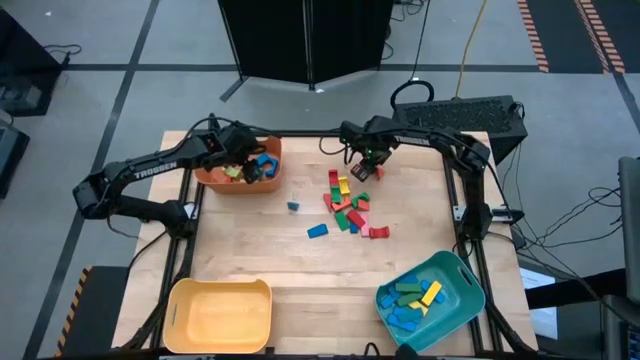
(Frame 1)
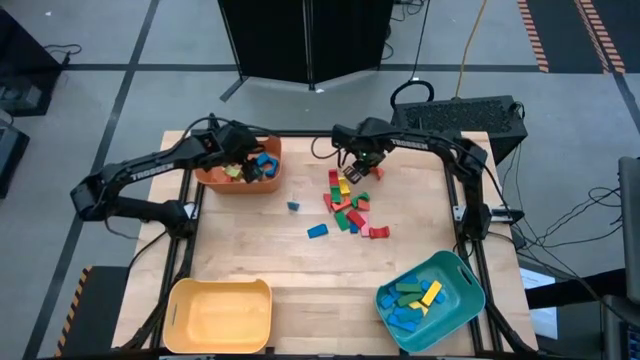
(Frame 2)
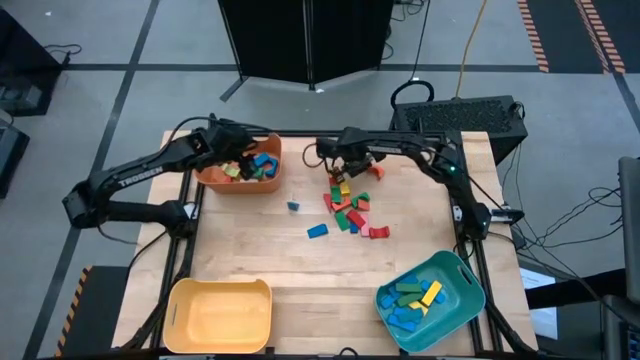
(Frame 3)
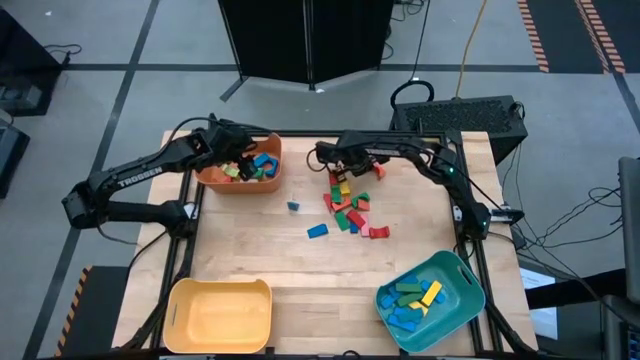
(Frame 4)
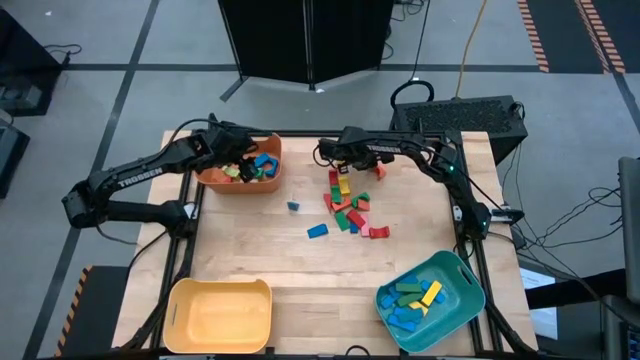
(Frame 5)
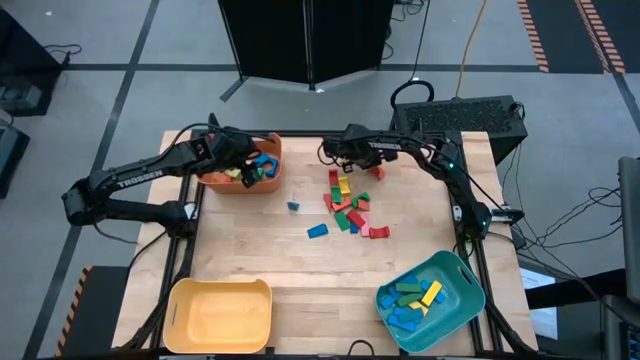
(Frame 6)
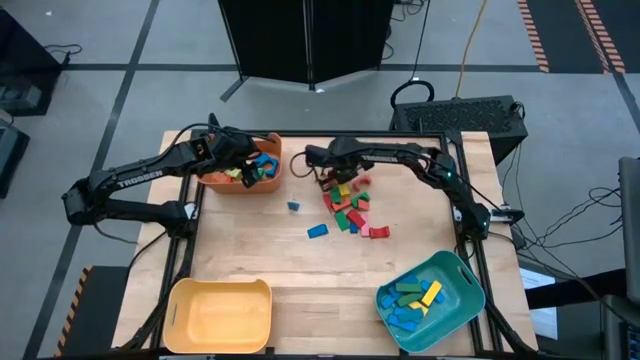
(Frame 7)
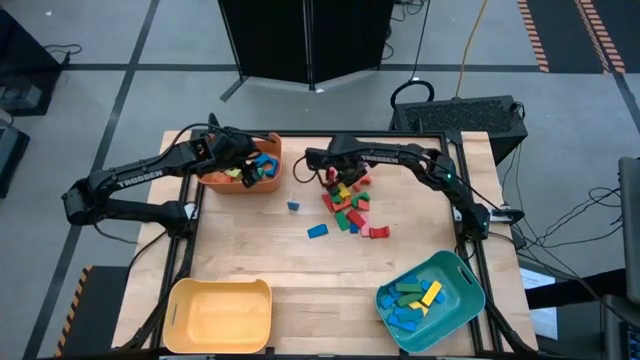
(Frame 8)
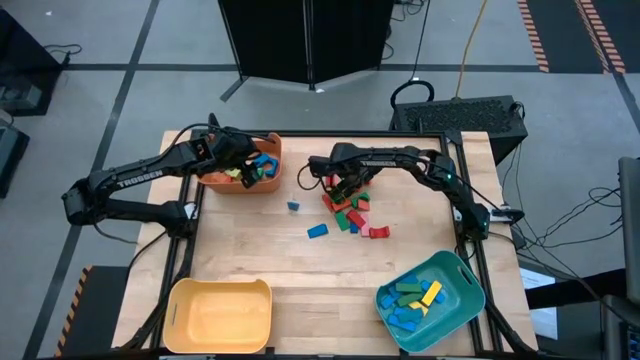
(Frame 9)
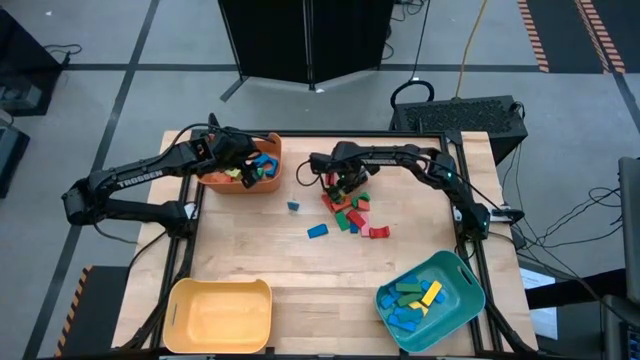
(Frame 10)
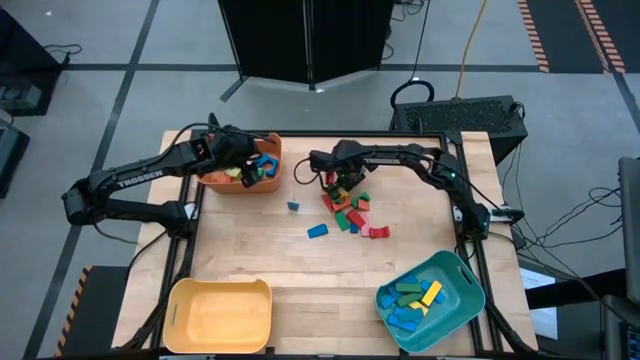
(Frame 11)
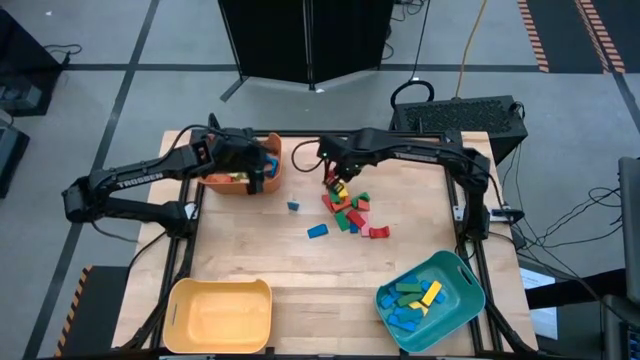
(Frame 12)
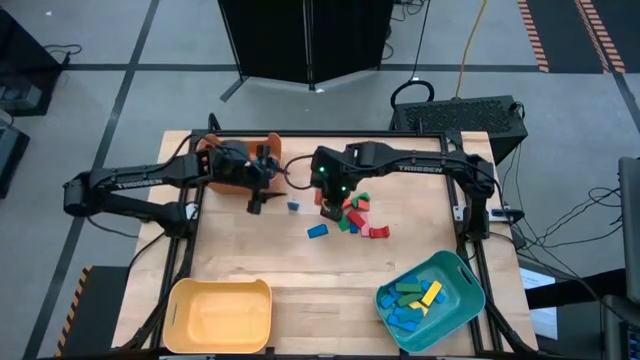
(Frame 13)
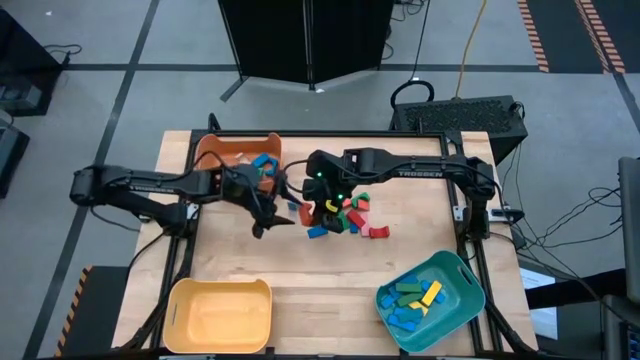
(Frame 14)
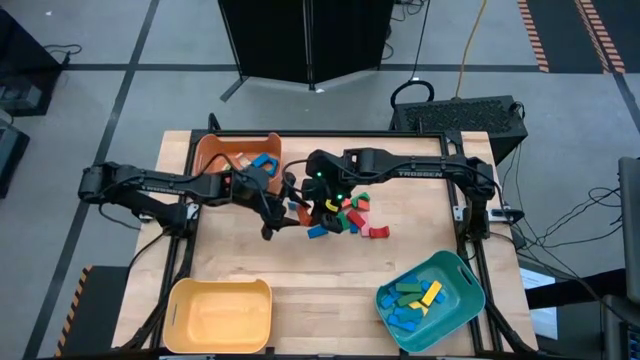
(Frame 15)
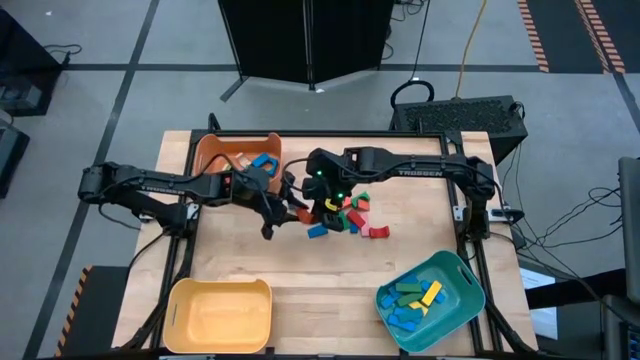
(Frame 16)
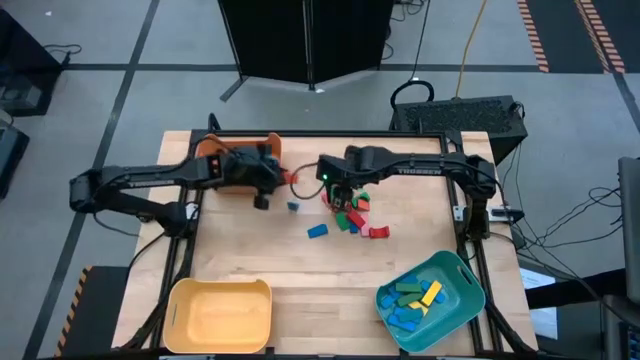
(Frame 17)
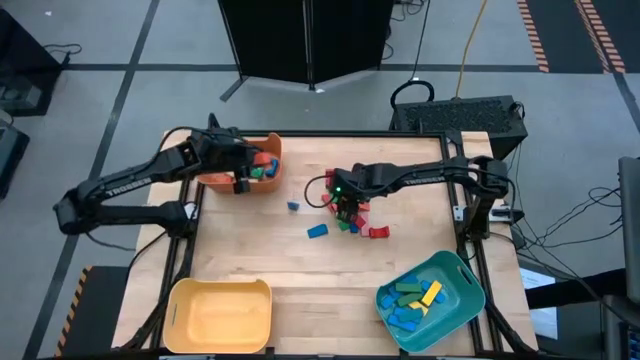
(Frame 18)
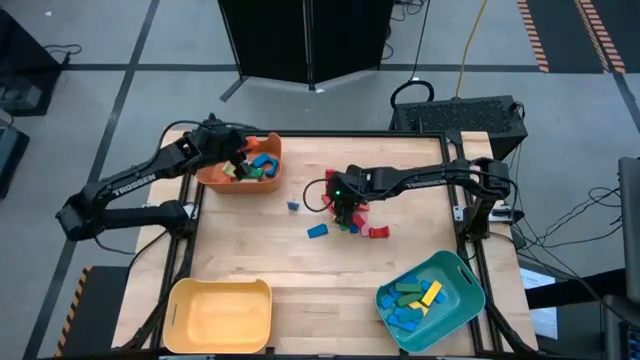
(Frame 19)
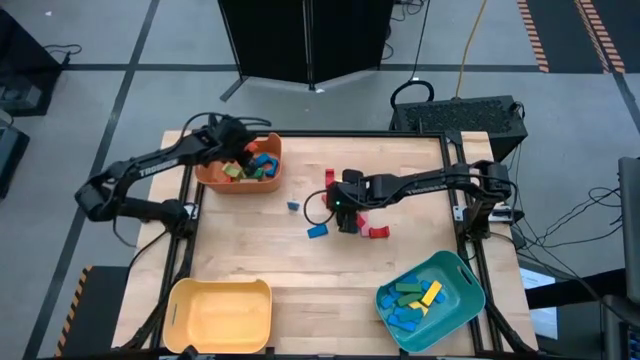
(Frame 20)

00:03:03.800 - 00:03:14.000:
Task: Sort blocks by size
Put the orange arch block into the orange bin

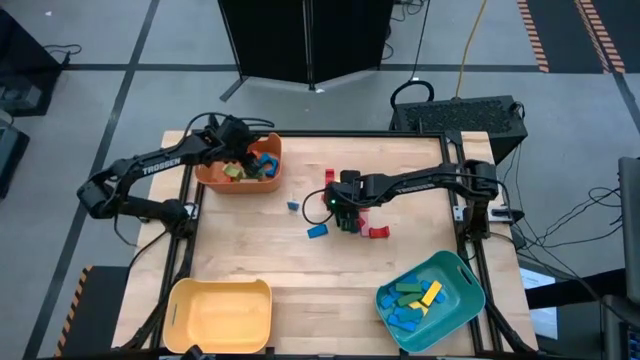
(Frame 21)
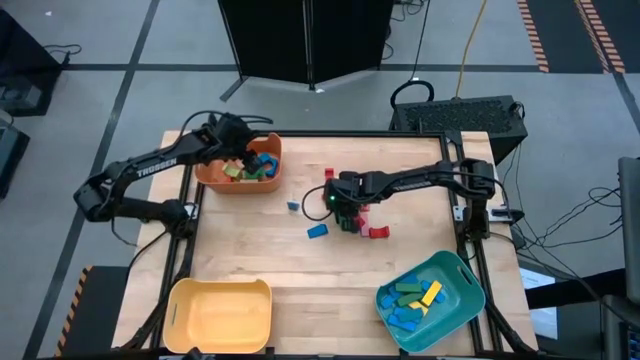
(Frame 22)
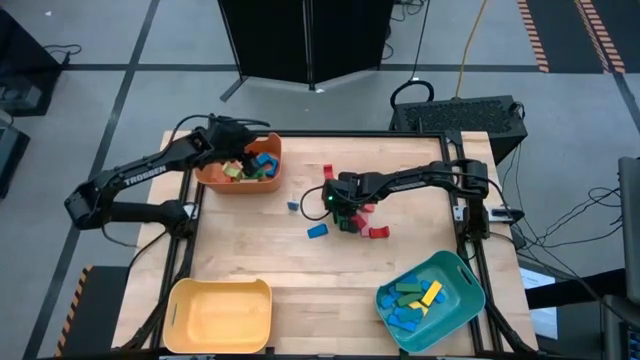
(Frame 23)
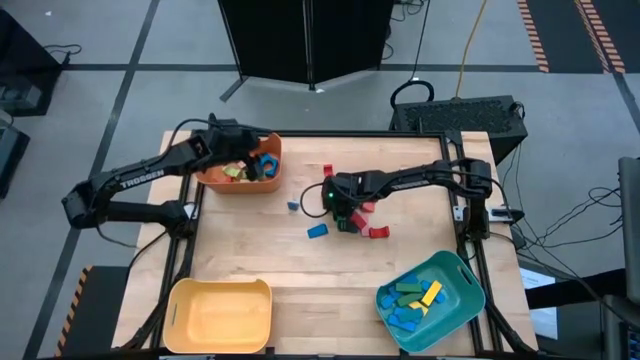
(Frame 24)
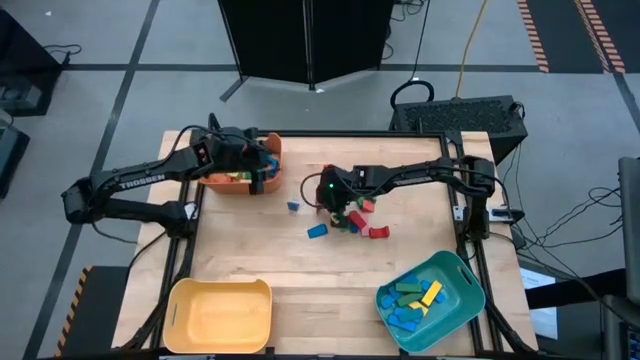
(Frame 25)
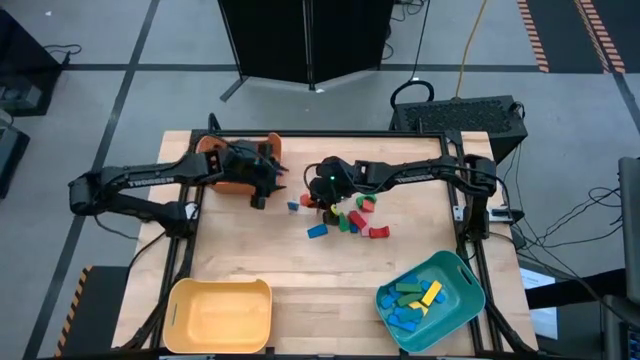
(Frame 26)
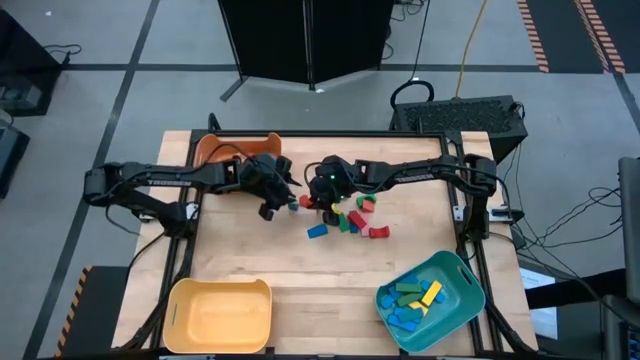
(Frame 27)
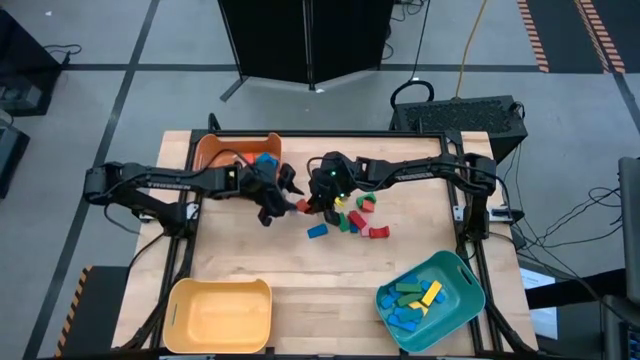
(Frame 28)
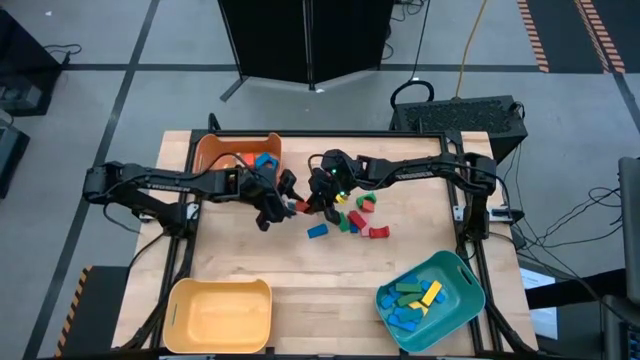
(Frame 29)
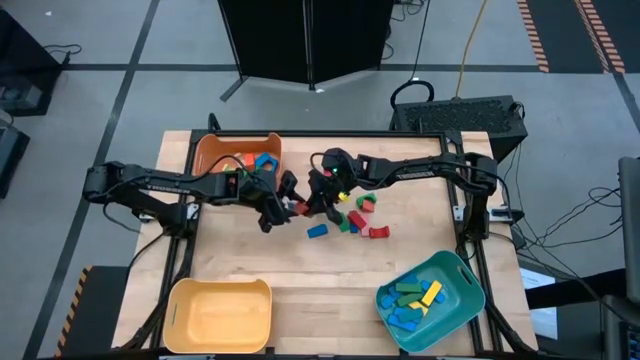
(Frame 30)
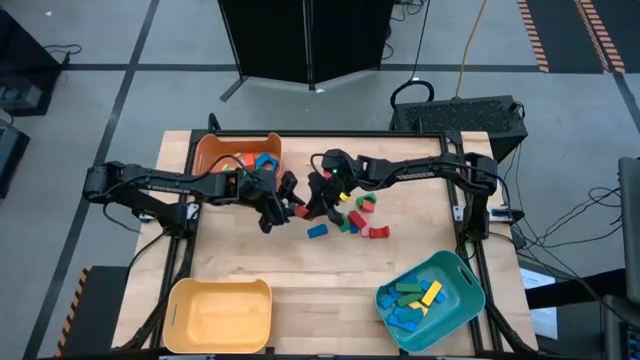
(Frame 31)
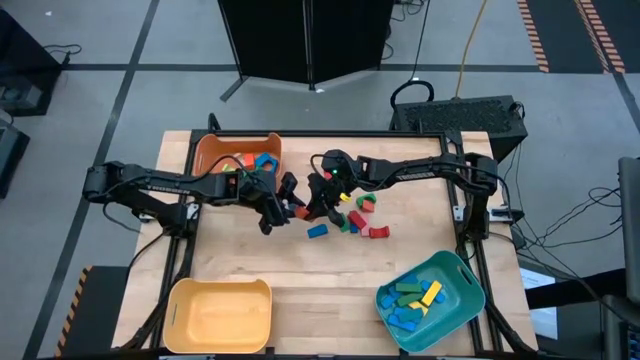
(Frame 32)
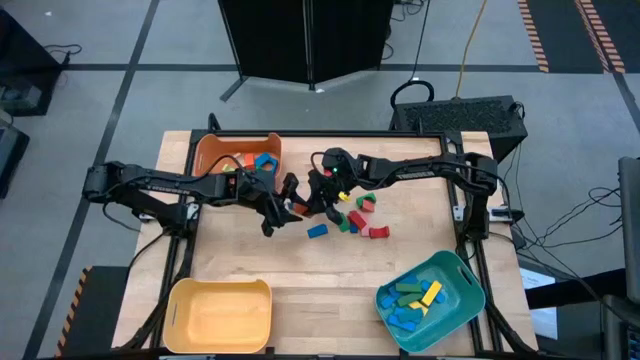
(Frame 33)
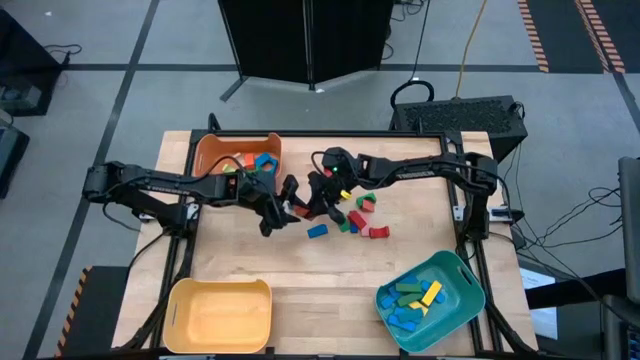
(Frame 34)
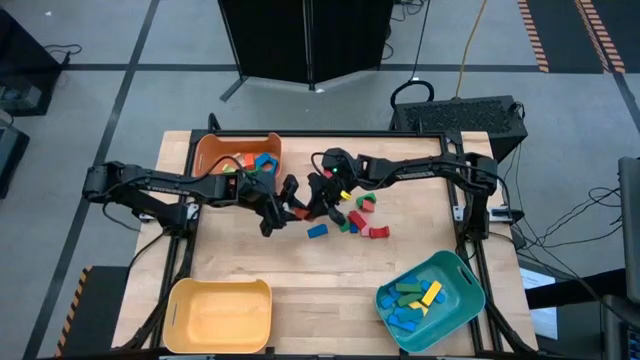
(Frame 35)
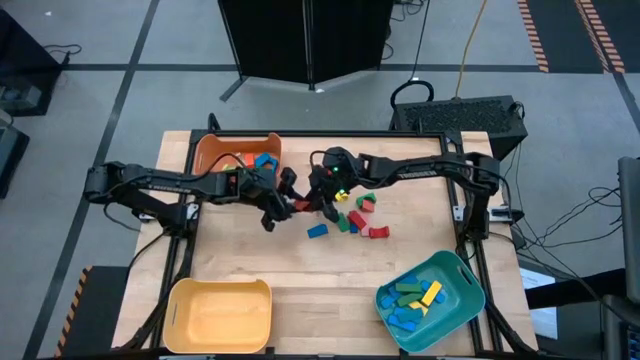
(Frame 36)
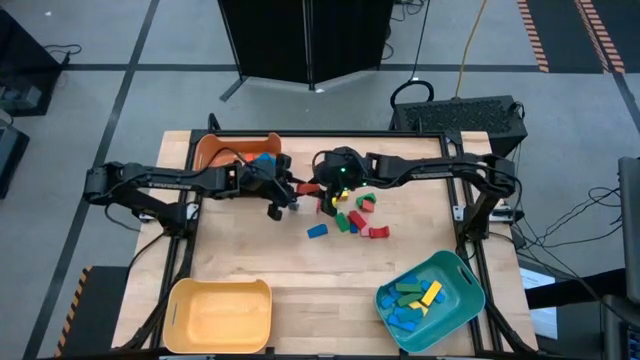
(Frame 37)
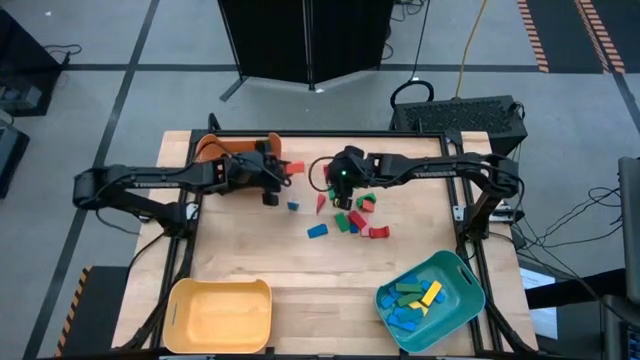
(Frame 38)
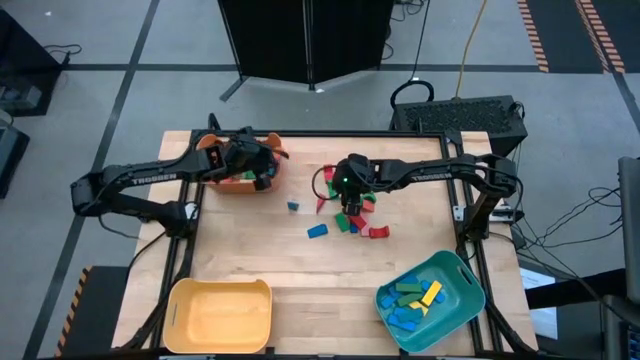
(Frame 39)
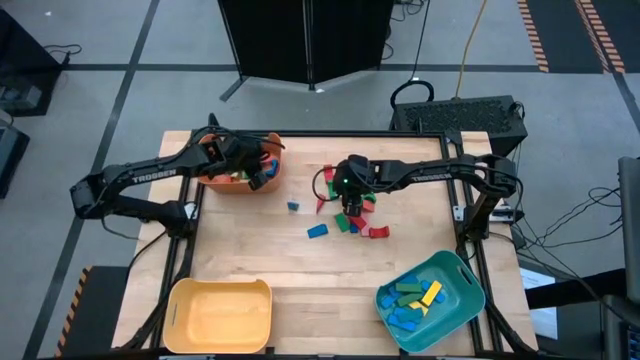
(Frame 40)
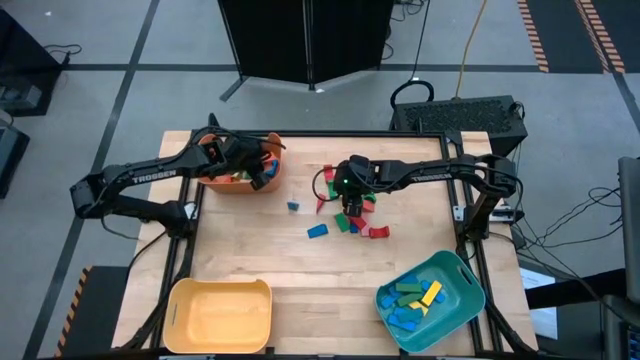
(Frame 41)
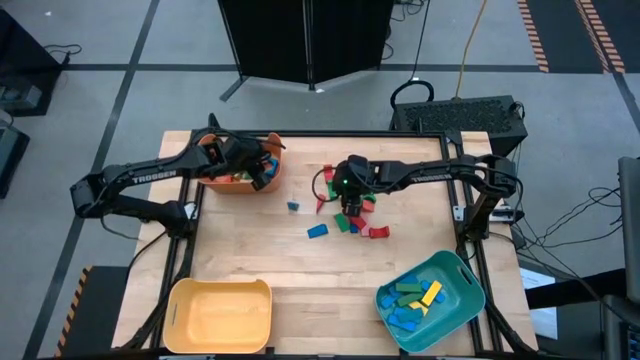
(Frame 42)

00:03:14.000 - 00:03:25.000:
Put the orange arch block into the orange bin

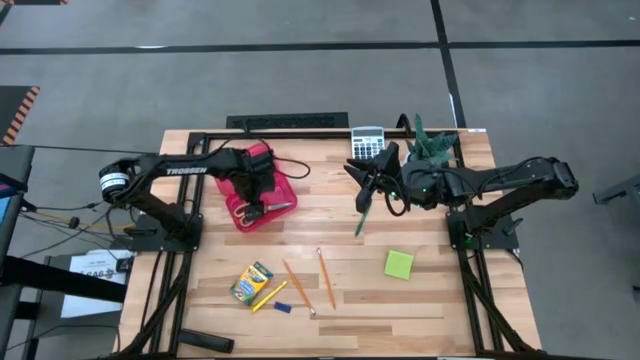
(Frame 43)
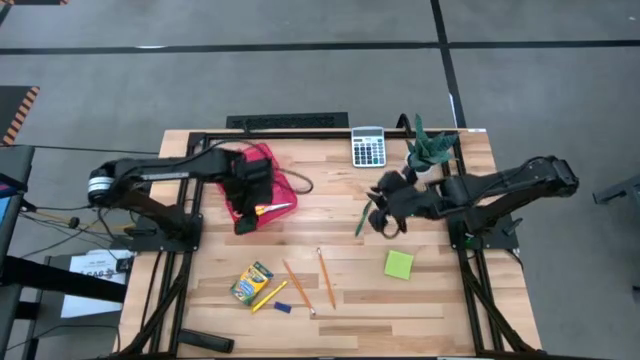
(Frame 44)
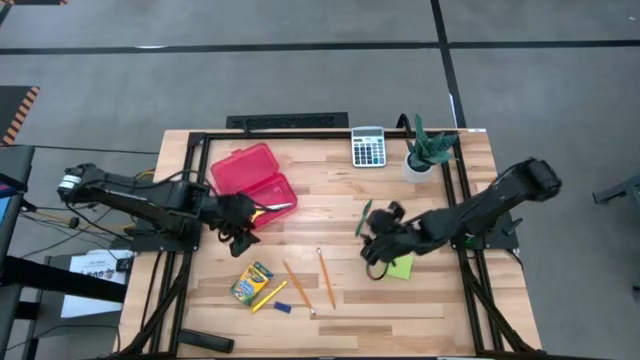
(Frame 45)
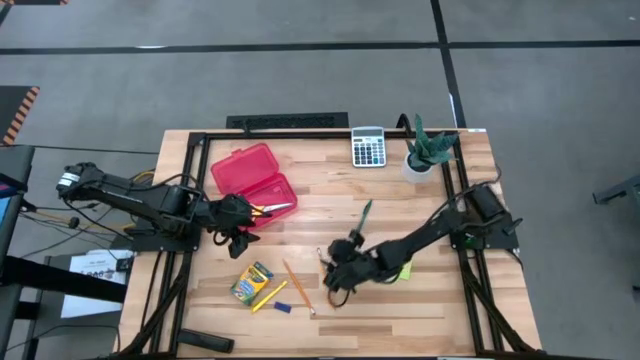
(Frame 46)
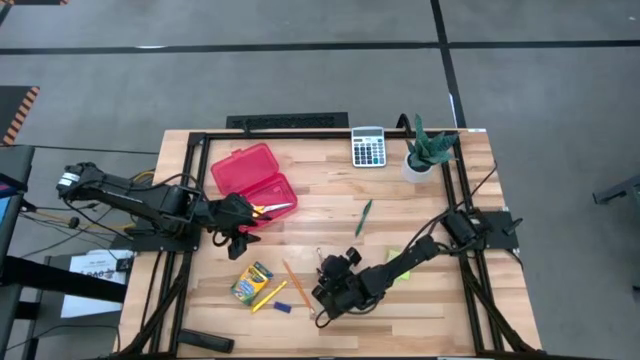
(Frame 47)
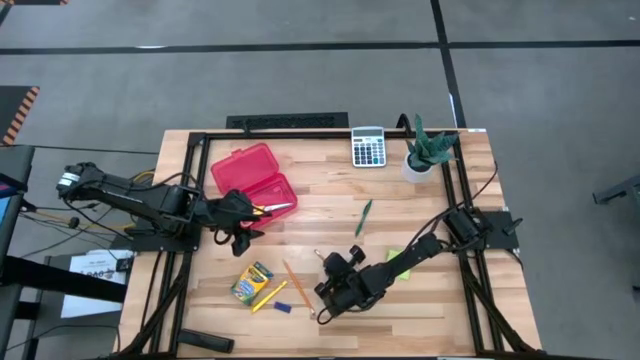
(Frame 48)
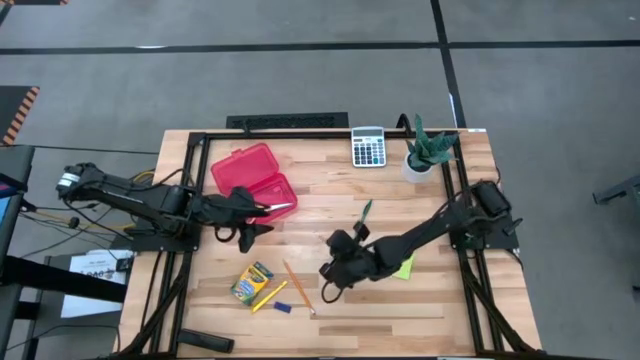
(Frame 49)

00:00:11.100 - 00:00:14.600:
Task: Pack school essentials
Put the right orange pencil into the red supply box
